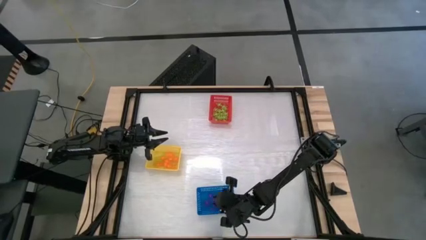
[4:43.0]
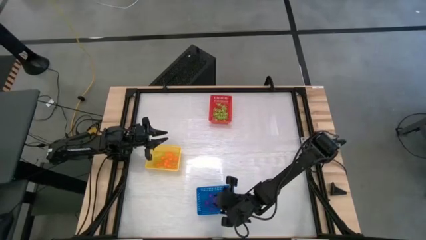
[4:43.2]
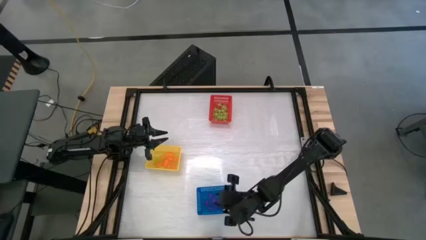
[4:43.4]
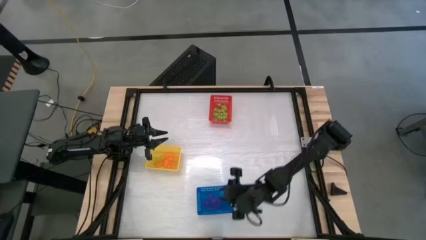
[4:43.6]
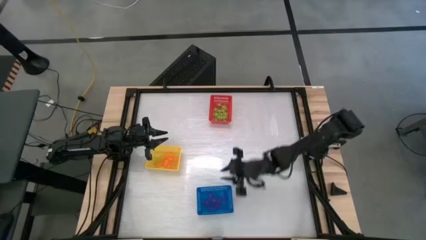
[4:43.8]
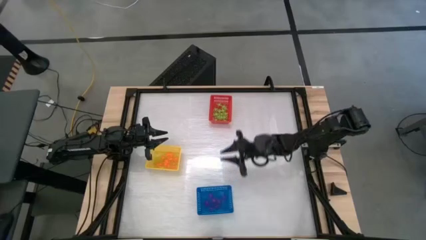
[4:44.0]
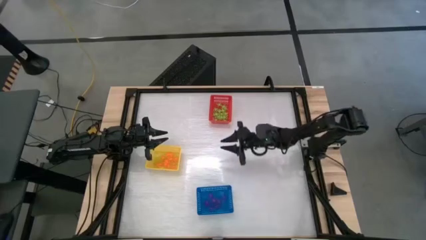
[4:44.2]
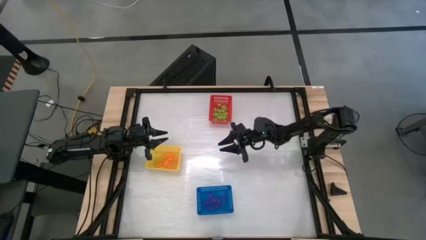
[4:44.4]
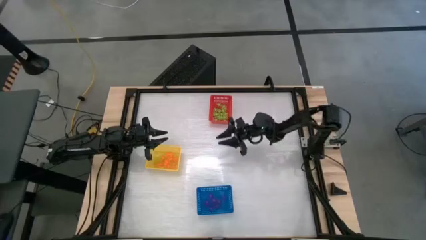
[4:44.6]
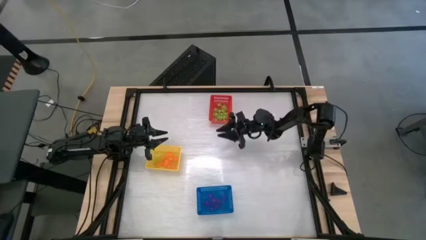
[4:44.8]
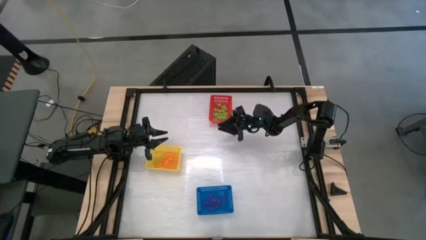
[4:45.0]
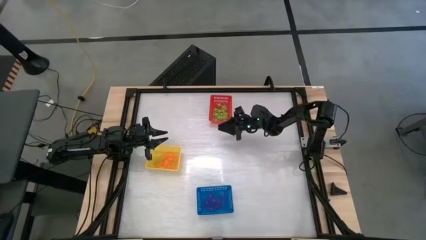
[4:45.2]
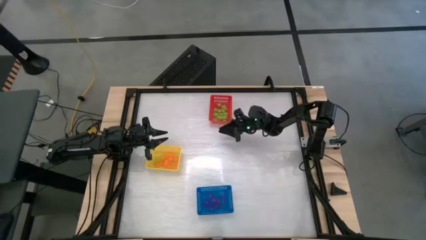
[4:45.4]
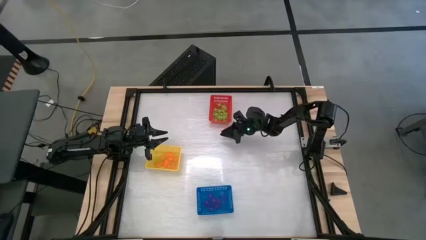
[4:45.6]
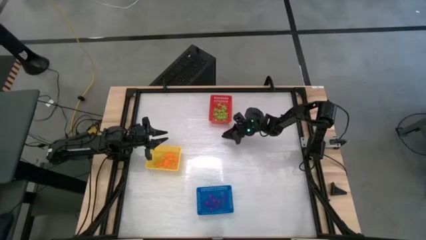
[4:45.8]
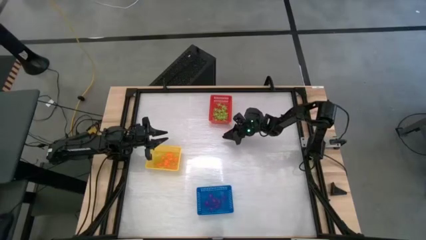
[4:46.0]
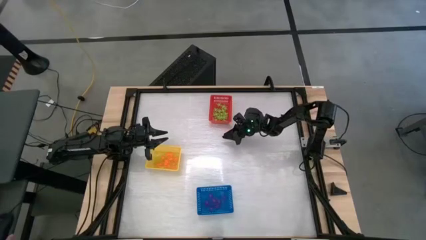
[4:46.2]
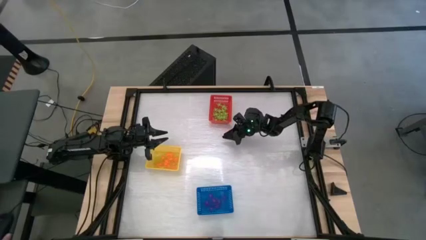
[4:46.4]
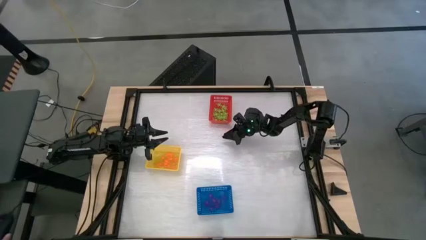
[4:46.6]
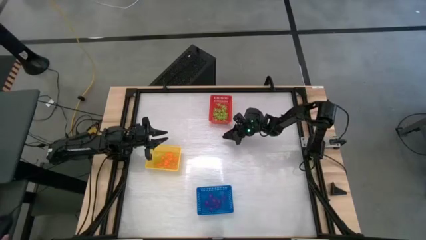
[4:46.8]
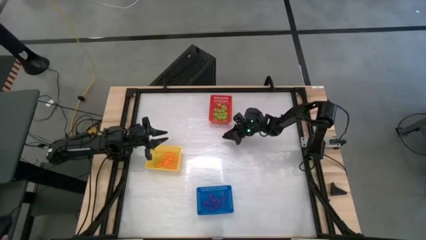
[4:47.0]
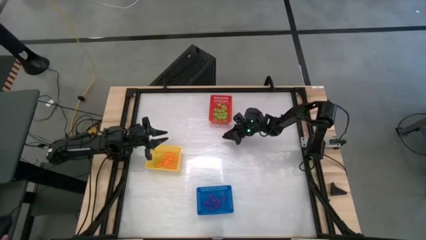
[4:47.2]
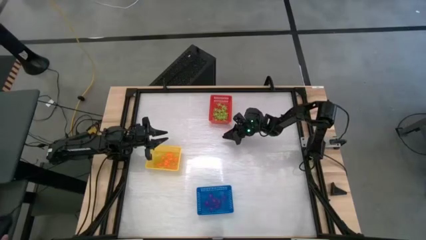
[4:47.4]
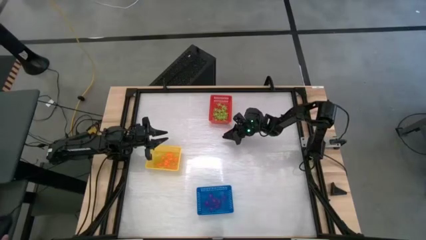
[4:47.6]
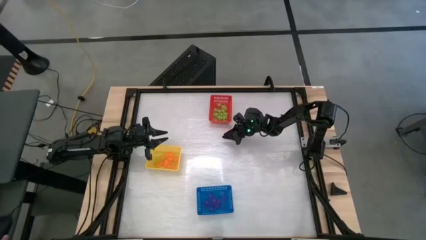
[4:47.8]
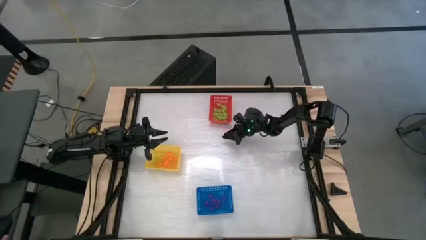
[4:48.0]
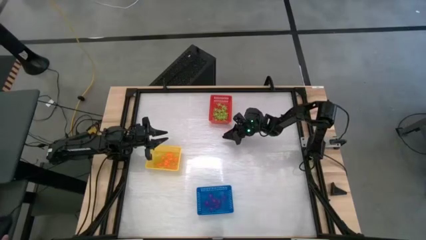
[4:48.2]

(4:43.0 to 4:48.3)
Task: Sort Halloween decoration
Return to Home Position

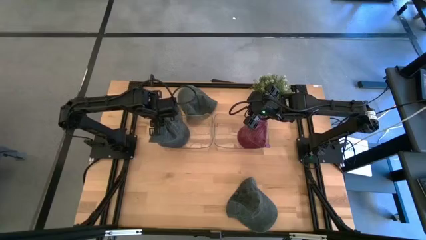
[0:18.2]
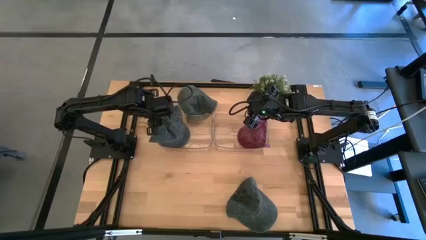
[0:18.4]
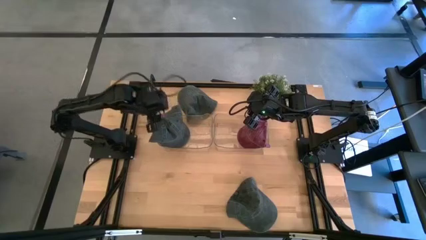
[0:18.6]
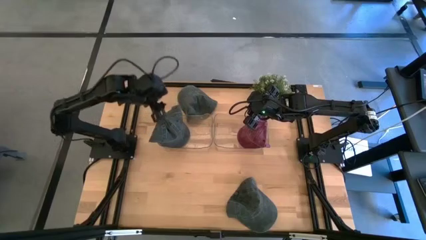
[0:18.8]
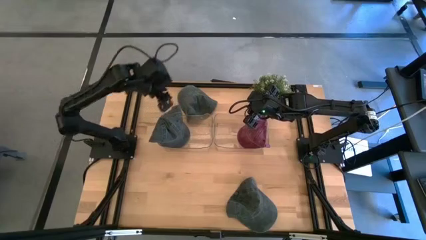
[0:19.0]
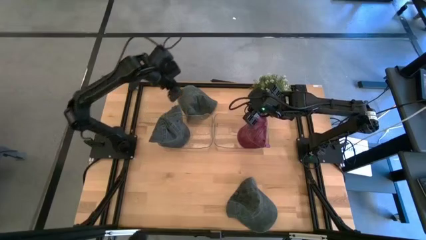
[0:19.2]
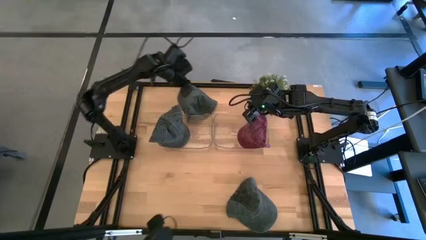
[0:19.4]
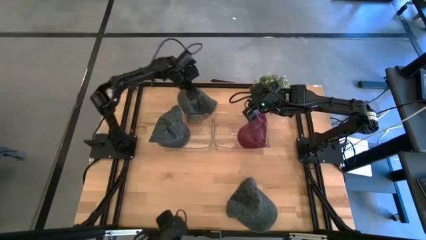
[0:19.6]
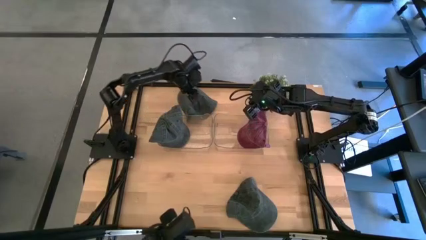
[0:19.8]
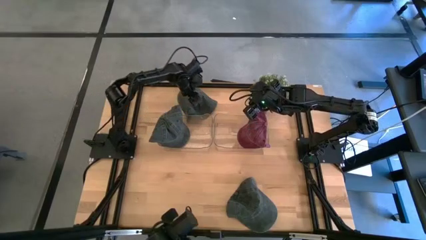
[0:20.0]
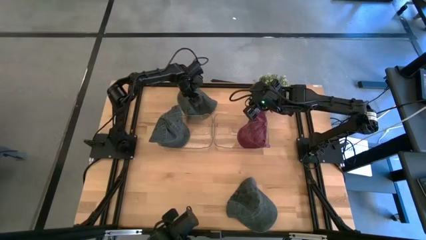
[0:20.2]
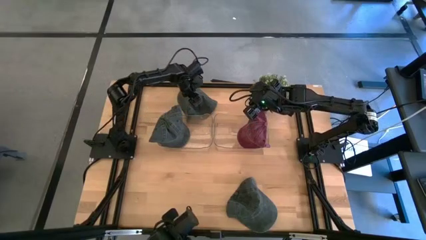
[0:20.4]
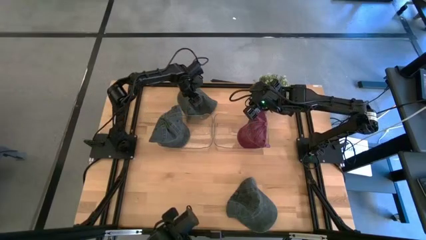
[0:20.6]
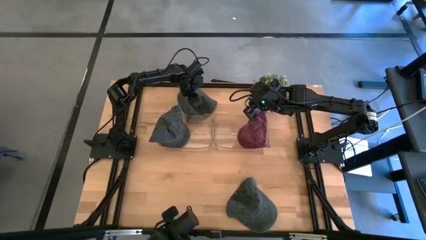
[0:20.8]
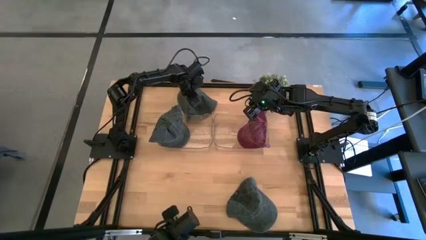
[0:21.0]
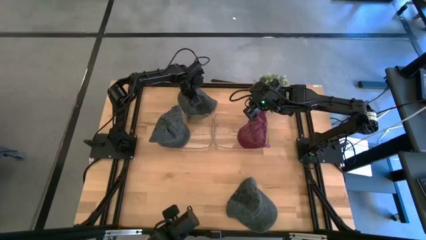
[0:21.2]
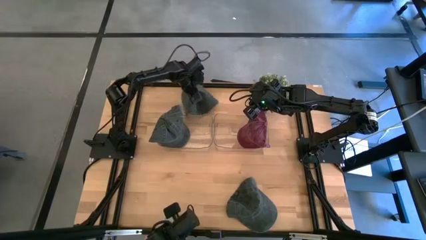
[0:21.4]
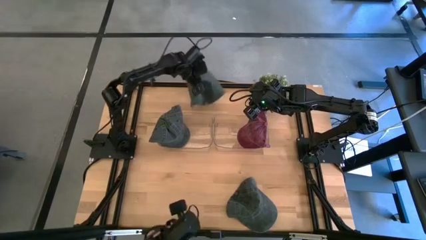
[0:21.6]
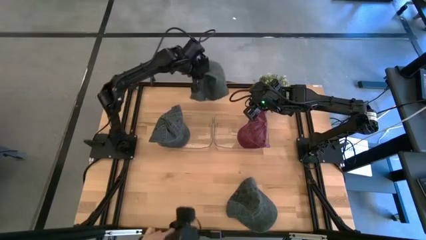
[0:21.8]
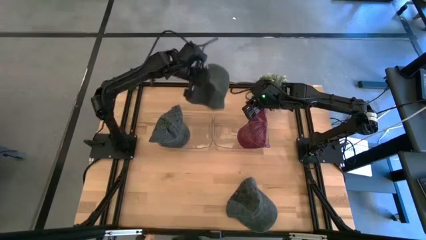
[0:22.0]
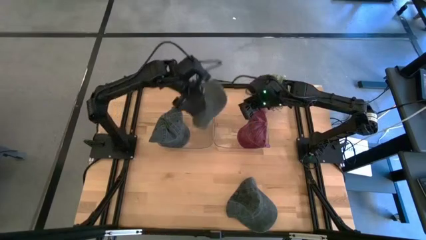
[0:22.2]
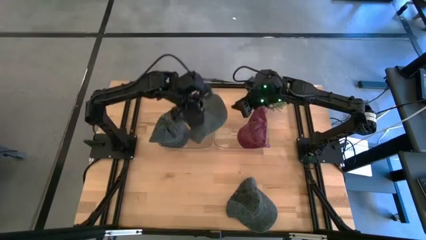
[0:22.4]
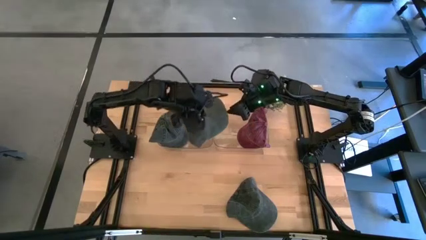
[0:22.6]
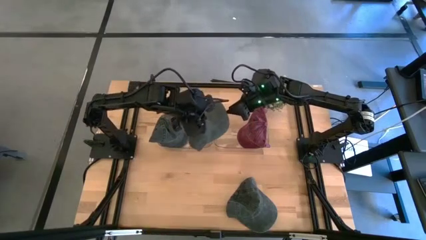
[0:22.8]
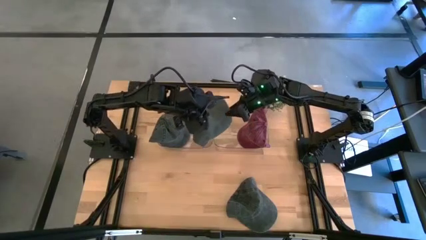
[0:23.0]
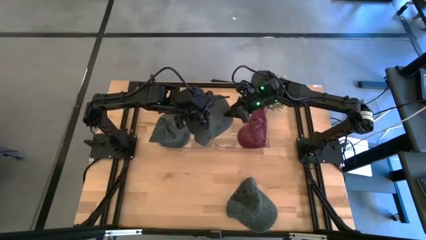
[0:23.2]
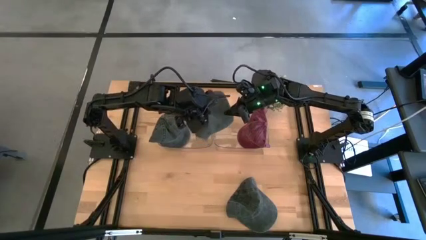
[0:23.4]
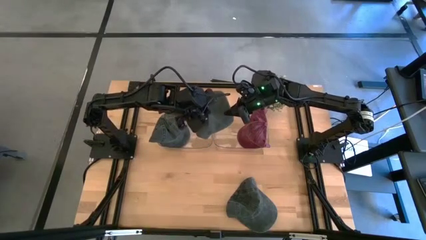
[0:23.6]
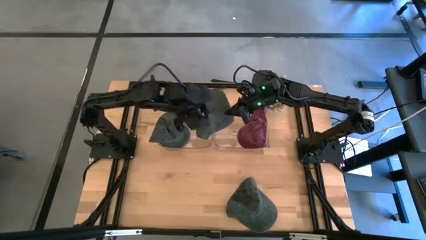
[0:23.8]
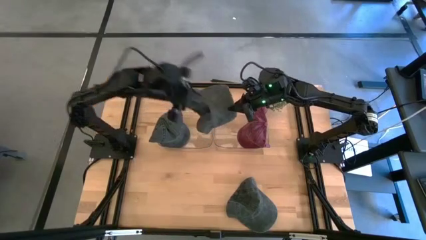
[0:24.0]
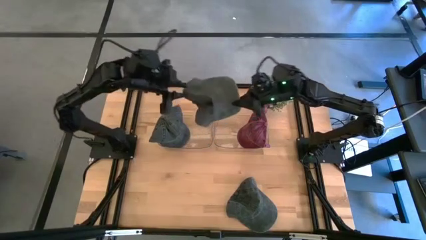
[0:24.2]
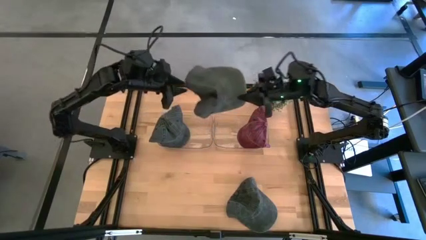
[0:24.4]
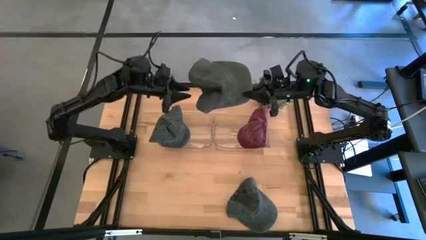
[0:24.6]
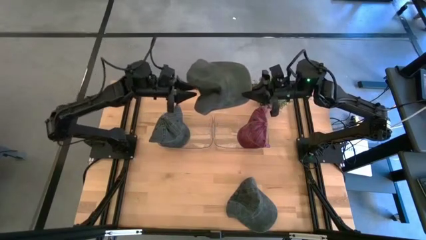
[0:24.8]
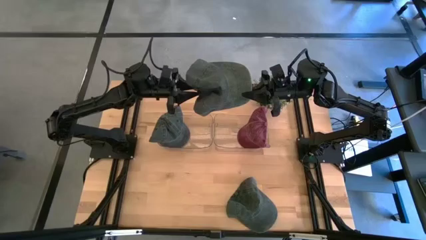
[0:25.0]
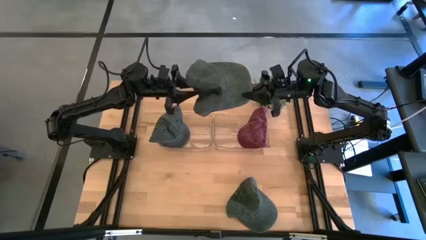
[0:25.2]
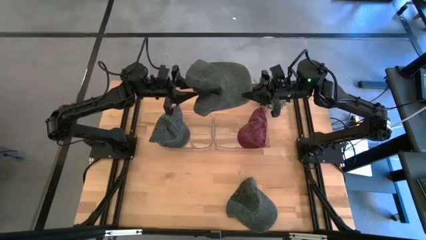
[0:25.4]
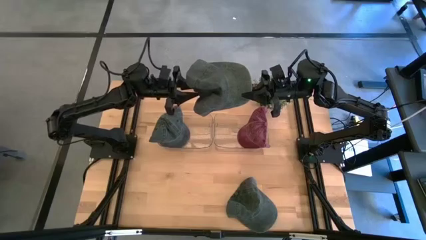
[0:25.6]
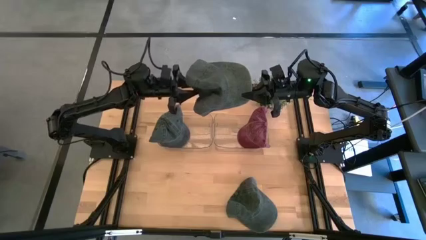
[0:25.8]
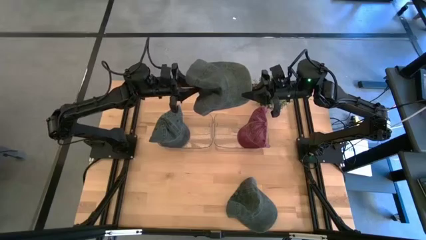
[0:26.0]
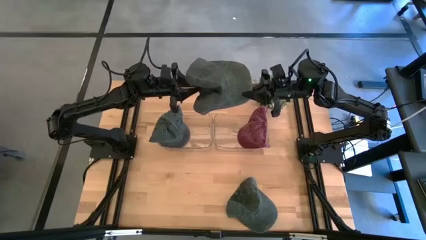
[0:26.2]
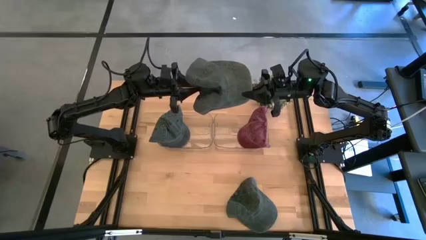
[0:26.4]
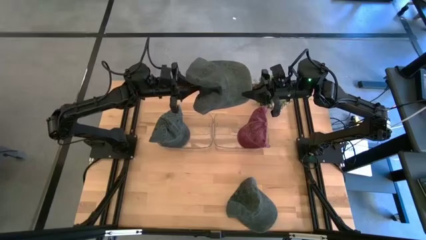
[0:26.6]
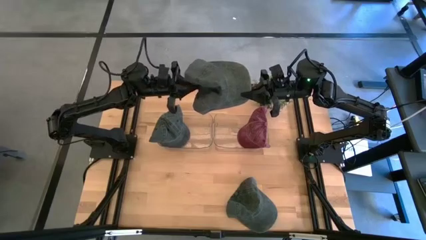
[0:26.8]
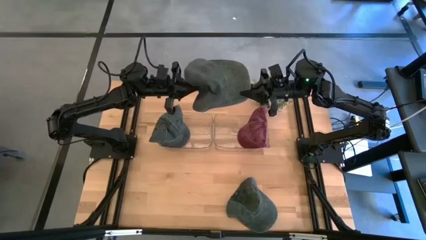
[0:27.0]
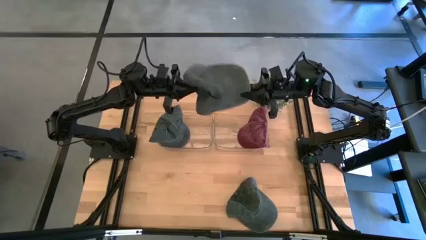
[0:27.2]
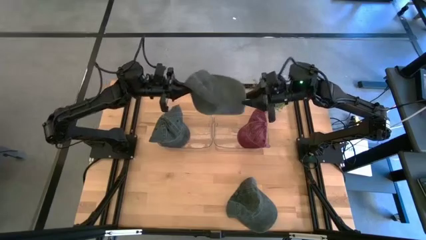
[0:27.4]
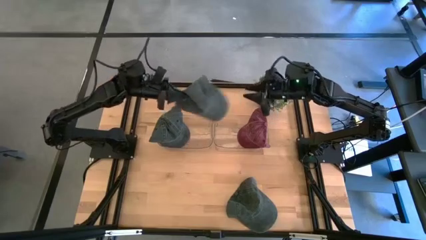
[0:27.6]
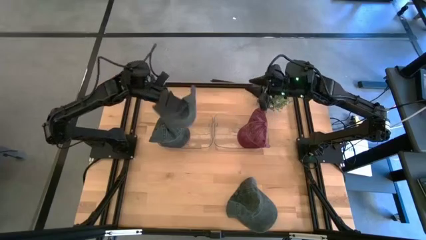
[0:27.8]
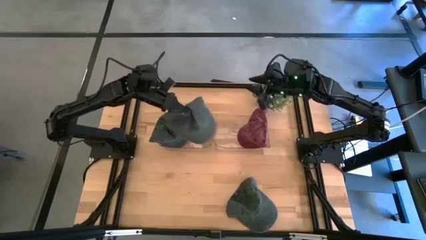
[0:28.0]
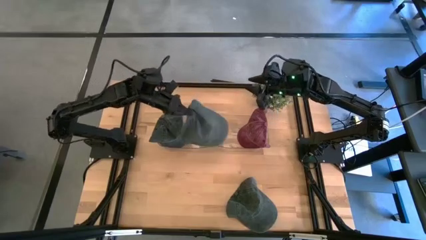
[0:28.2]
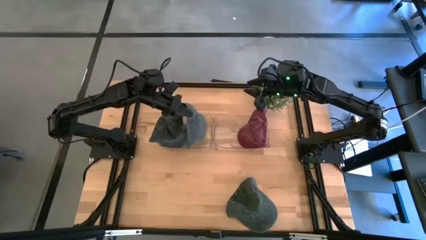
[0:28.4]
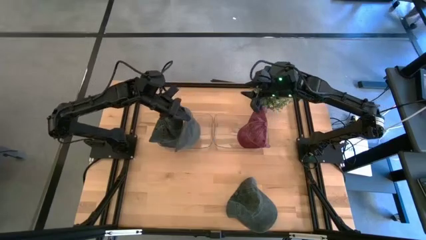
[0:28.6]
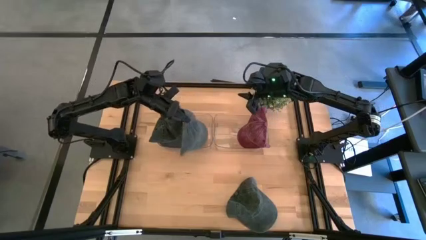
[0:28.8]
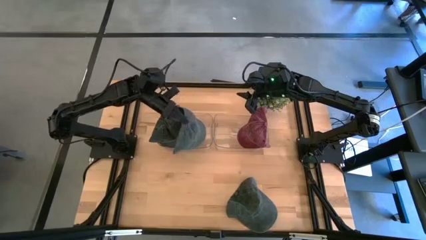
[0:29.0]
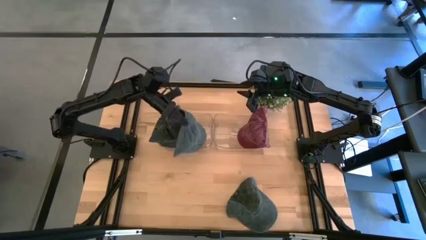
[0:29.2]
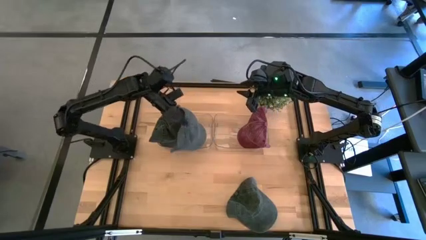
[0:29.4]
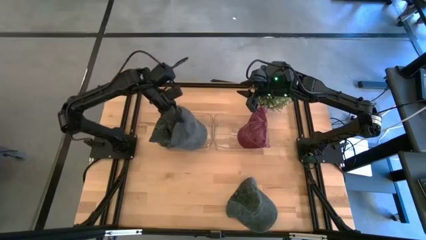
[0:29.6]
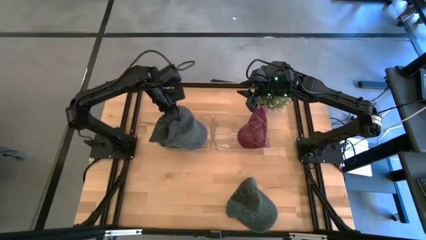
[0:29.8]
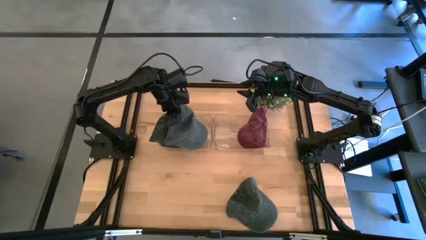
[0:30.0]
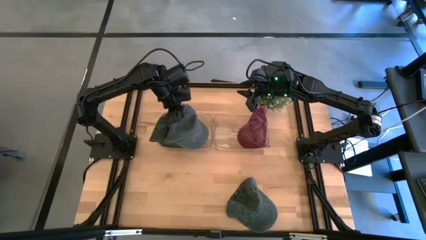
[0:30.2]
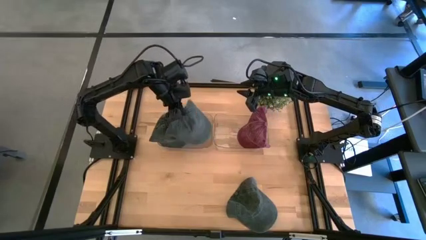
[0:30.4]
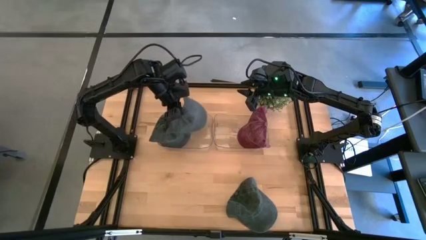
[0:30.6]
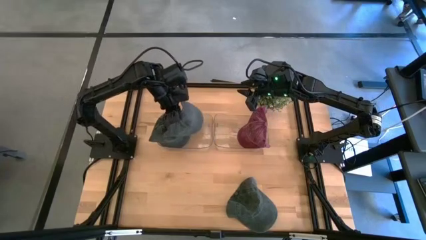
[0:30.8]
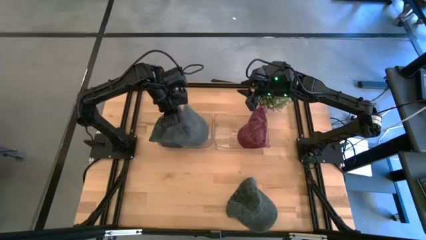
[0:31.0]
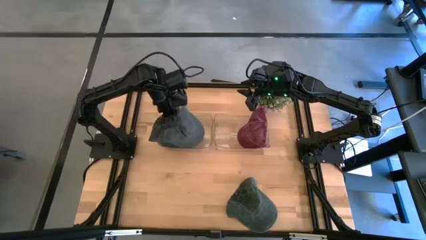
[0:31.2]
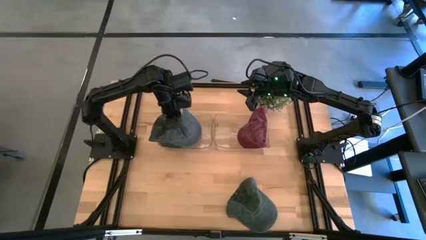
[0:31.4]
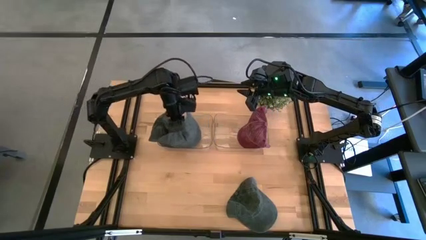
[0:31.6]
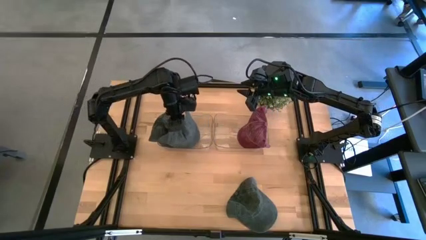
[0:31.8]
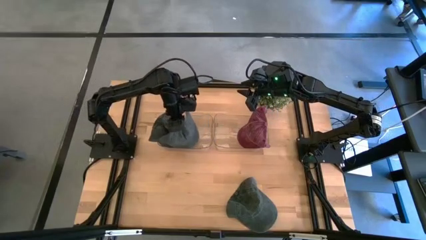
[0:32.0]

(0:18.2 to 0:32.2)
Task: Pick & Place hat
Put the top black cap into the left transparent bin
